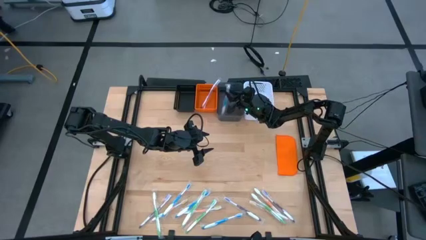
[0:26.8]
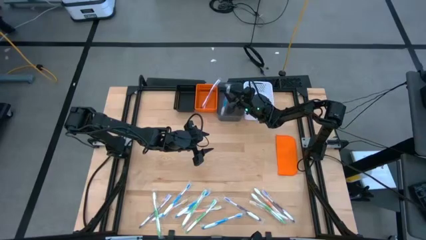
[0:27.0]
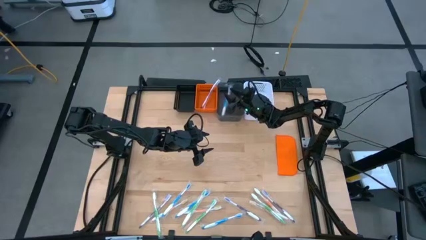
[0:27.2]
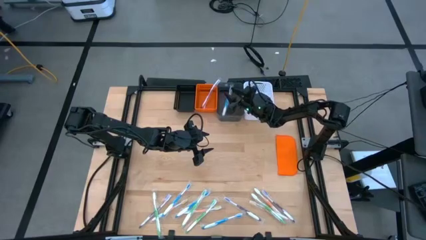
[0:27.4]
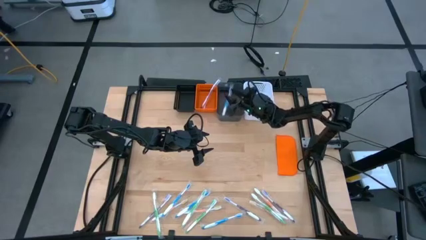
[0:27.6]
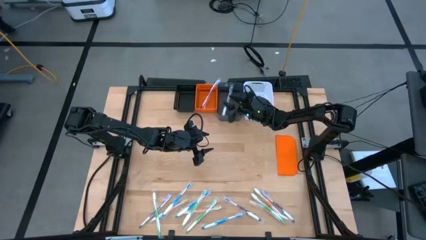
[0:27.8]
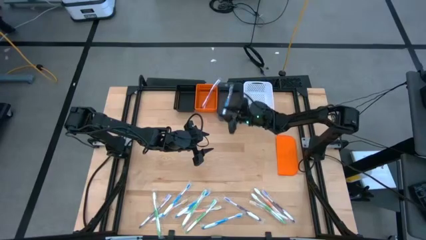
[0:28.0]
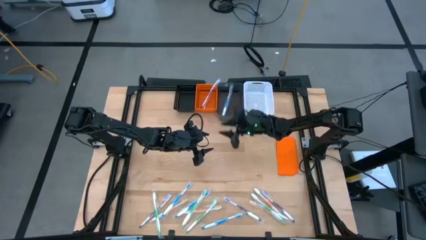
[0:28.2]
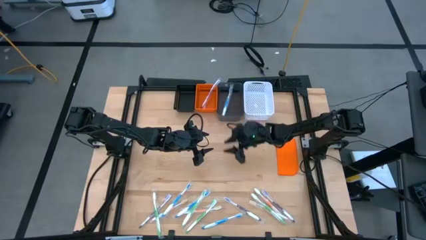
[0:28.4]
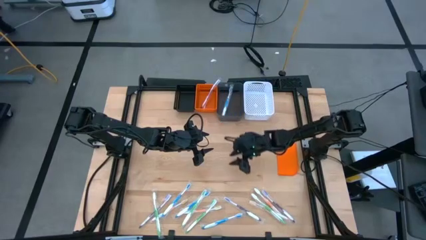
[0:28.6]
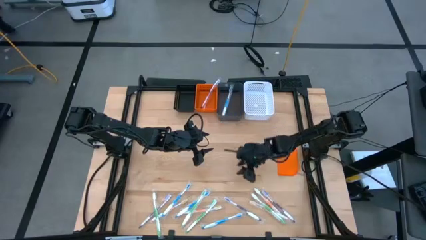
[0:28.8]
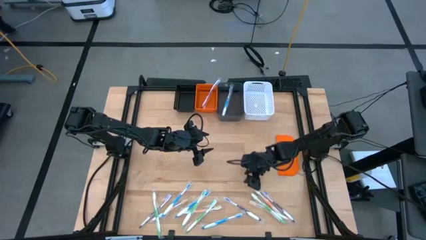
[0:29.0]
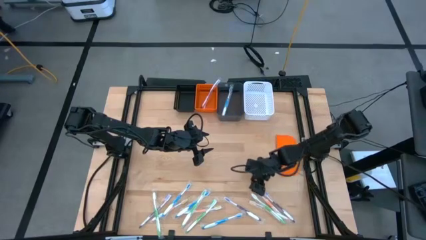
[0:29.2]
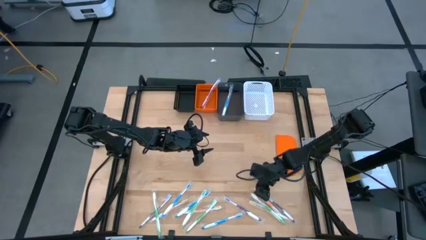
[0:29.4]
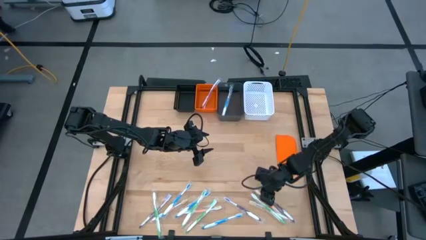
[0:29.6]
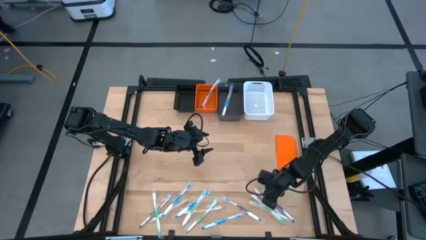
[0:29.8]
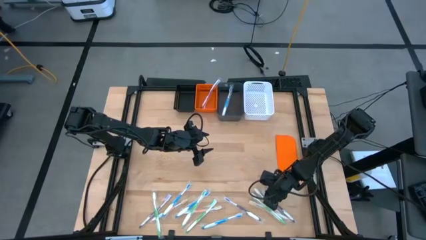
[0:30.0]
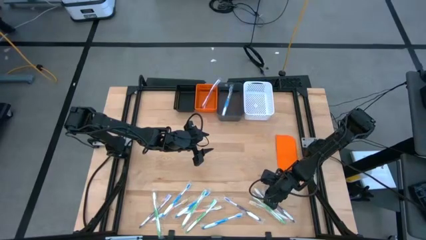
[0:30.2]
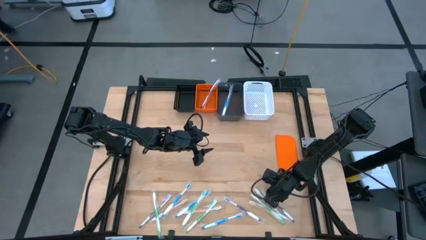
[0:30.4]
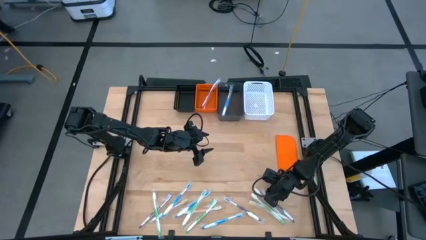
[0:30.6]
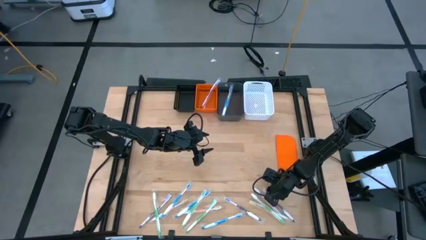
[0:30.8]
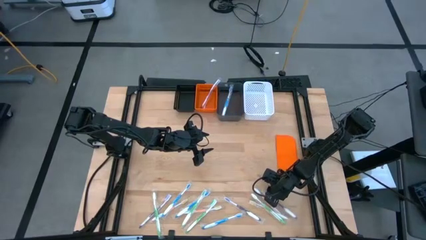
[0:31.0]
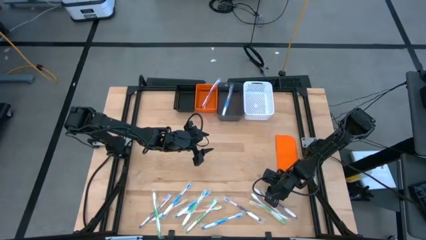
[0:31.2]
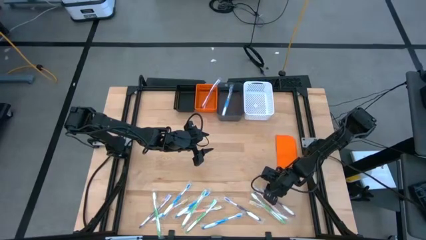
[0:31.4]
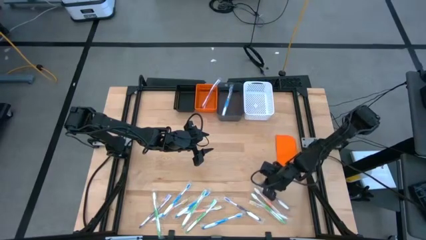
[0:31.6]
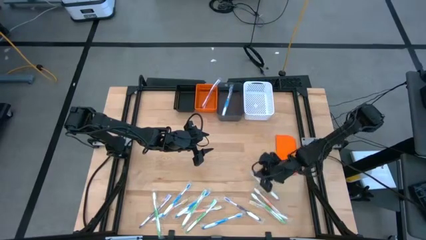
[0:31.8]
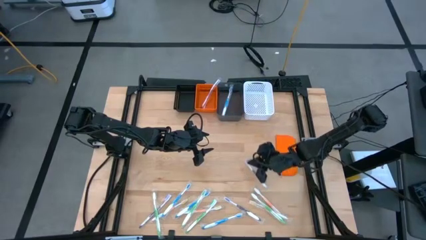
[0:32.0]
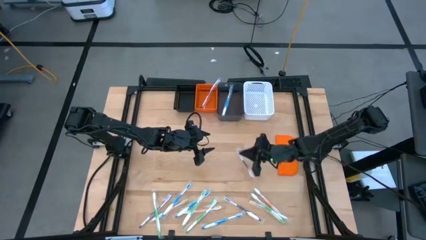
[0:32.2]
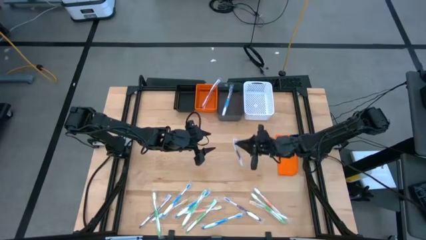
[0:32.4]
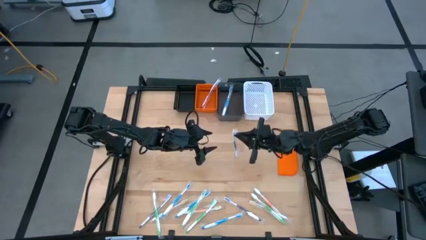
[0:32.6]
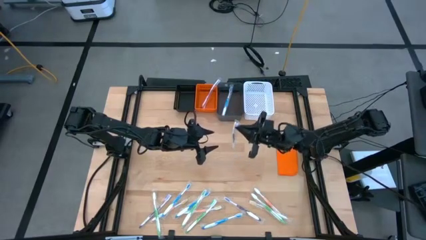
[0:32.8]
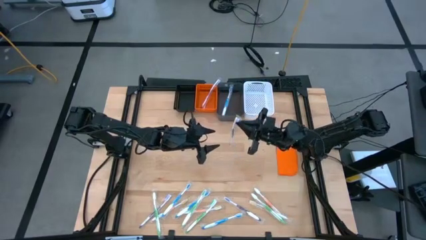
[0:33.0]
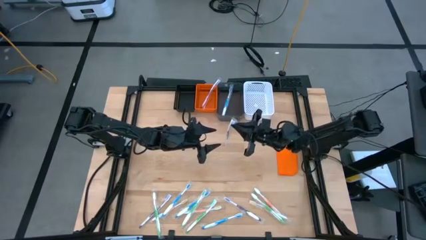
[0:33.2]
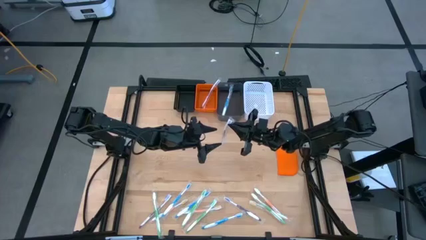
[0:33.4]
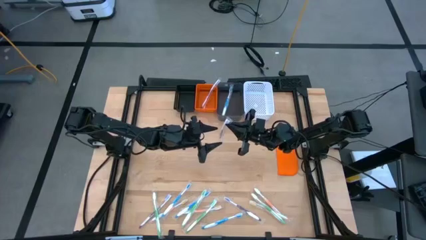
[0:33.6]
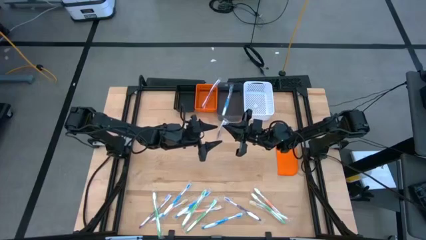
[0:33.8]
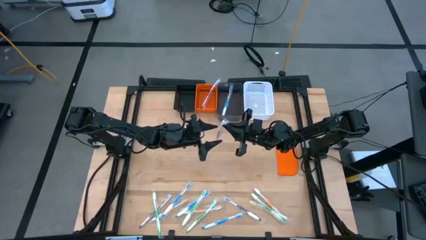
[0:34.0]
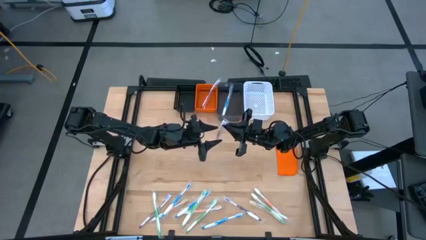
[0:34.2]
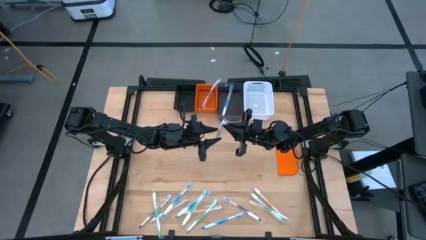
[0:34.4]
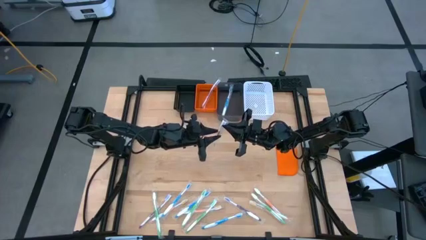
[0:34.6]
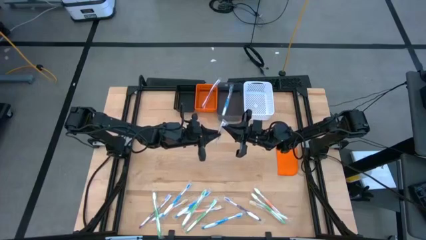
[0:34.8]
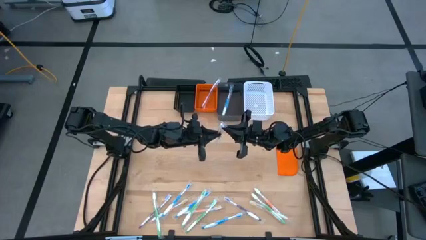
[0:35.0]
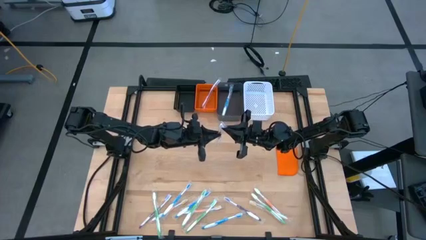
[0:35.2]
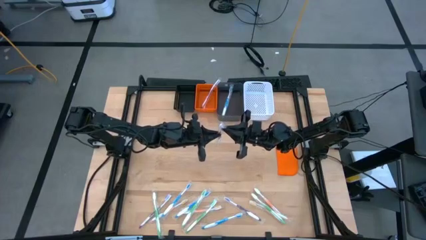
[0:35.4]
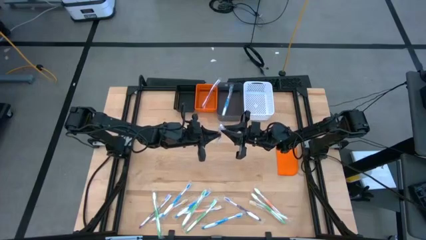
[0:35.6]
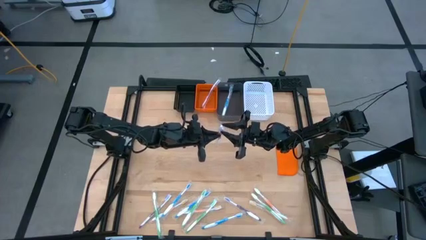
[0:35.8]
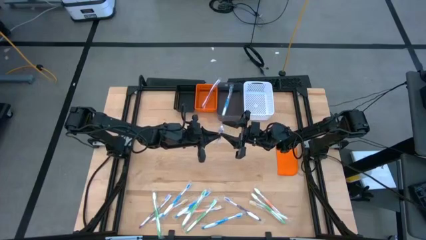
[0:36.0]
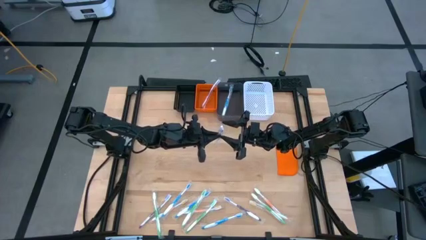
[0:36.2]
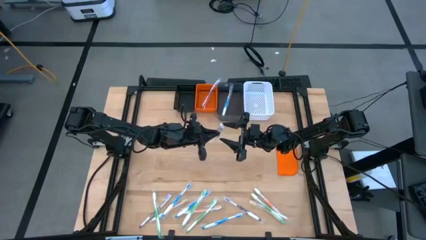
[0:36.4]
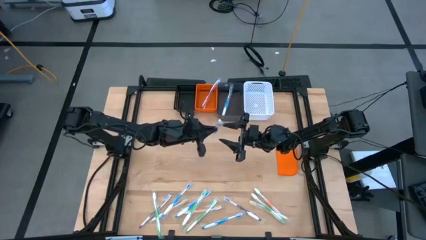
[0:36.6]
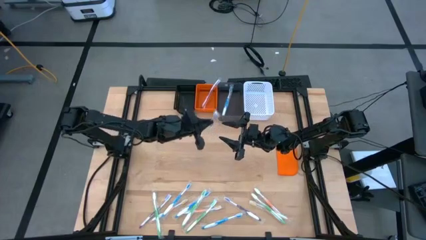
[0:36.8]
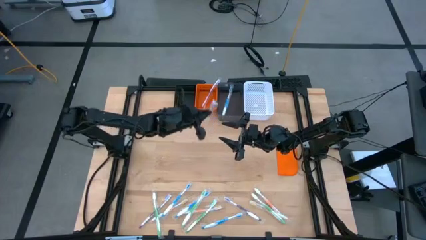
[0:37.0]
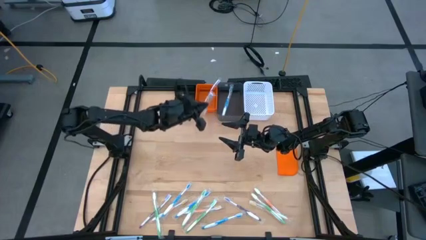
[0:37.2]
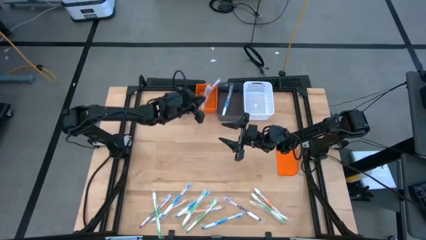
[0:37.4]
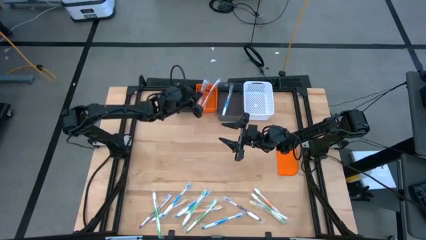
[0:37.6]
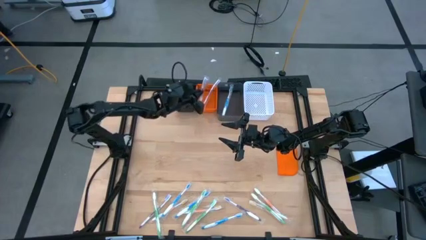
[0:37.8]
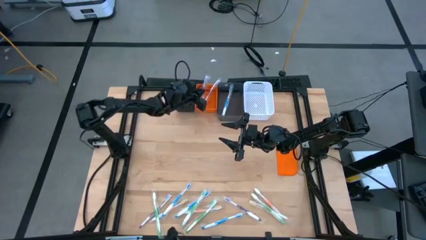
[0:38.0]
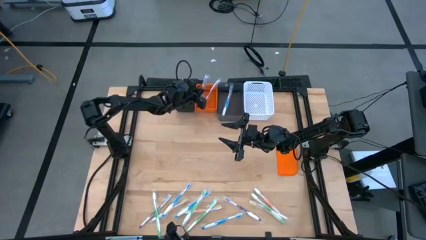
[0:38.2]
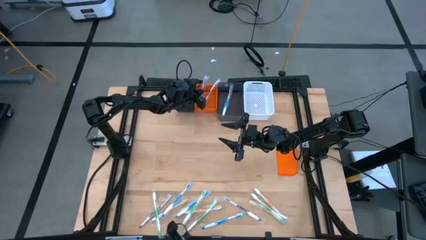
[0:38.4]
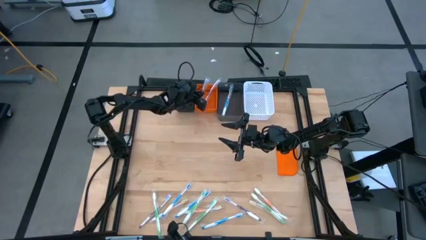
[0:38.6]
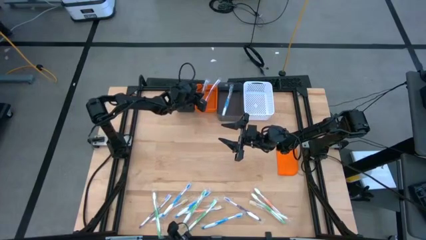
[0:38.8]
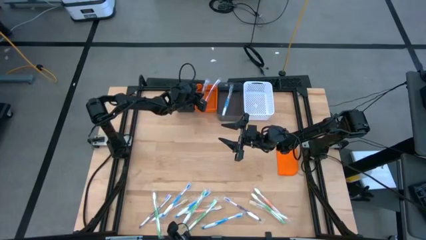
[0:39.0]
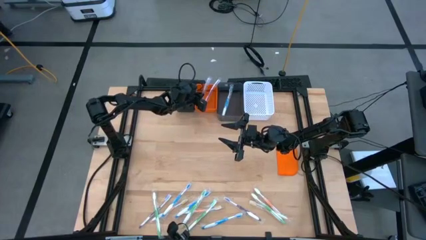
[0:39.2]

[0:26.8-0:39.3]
Task: Pick & Place Toothbrushes
Put the purple toothbrush into the orange bin

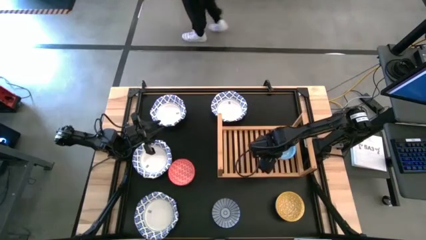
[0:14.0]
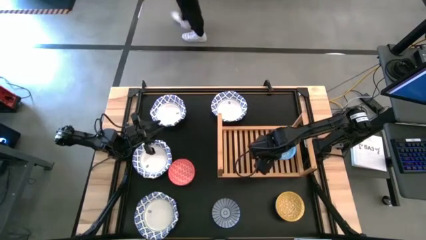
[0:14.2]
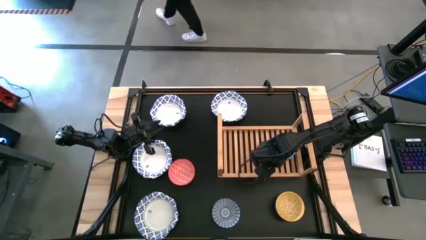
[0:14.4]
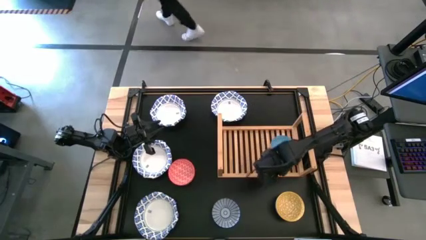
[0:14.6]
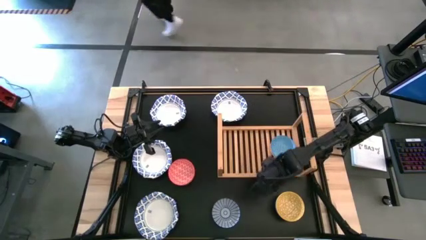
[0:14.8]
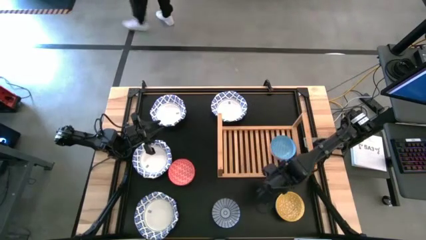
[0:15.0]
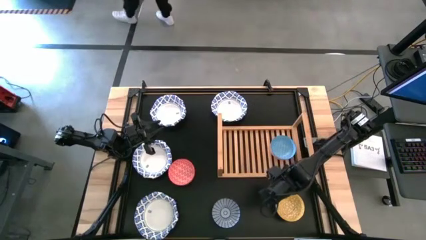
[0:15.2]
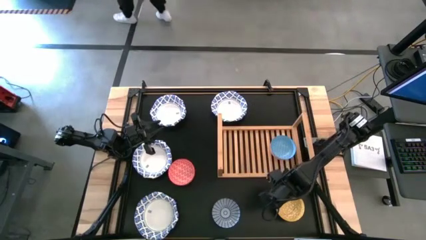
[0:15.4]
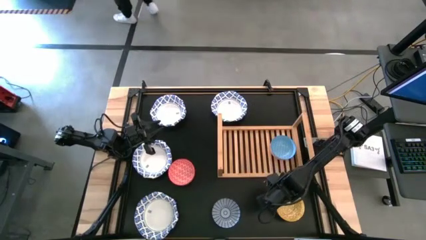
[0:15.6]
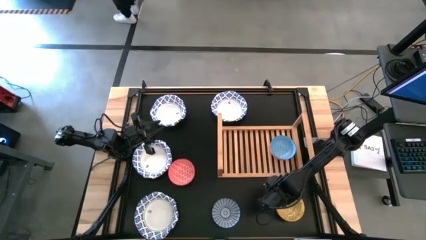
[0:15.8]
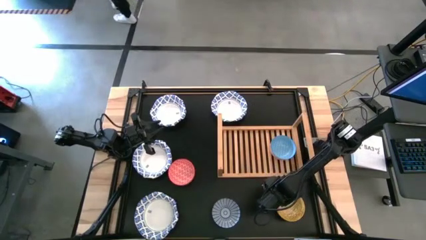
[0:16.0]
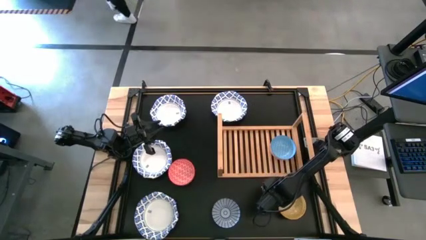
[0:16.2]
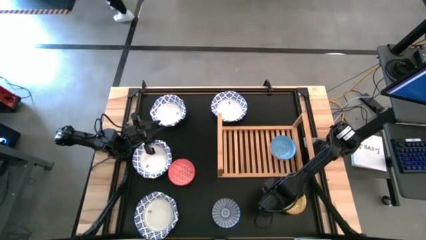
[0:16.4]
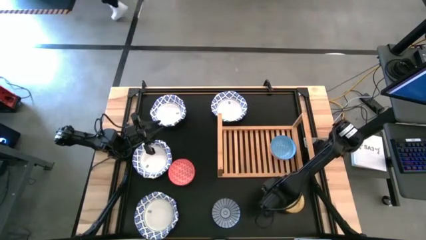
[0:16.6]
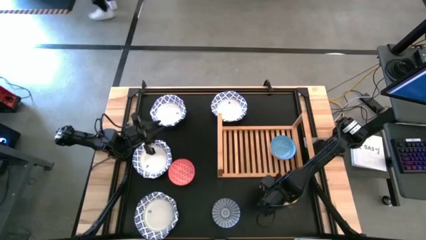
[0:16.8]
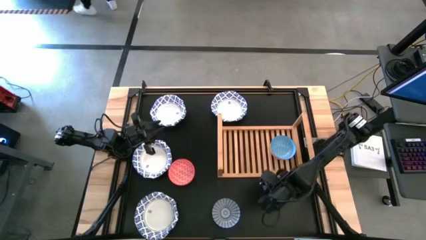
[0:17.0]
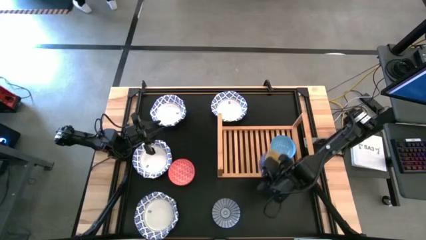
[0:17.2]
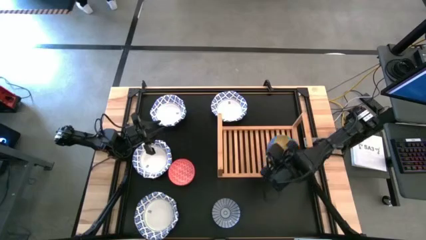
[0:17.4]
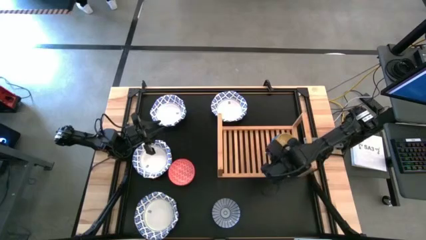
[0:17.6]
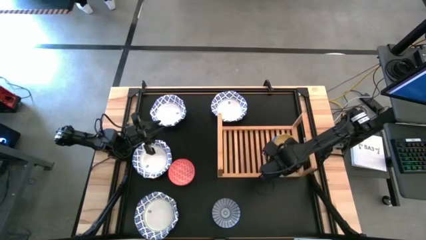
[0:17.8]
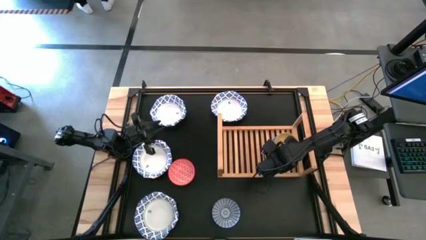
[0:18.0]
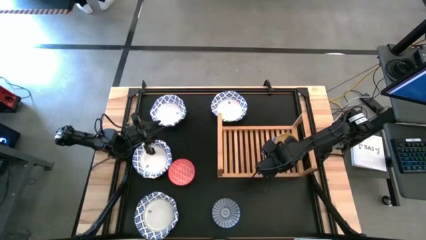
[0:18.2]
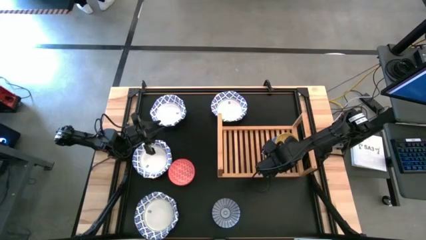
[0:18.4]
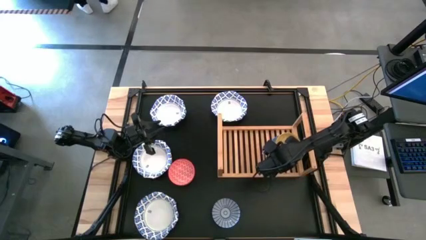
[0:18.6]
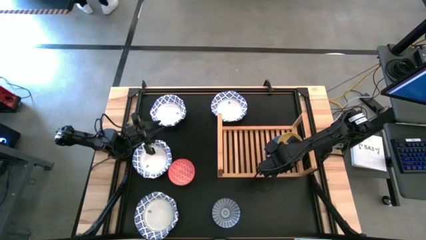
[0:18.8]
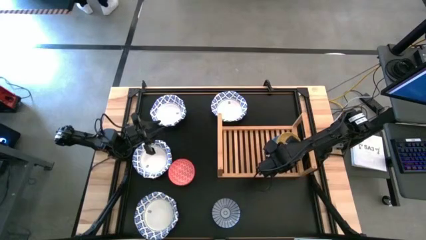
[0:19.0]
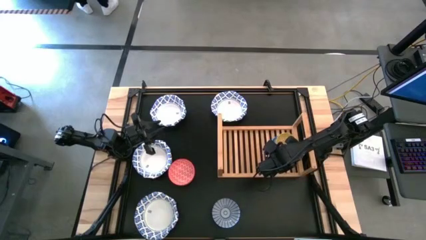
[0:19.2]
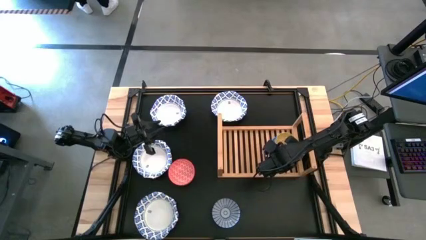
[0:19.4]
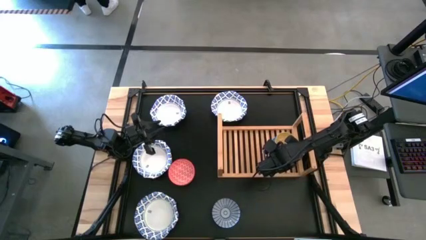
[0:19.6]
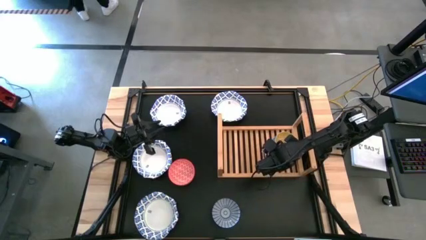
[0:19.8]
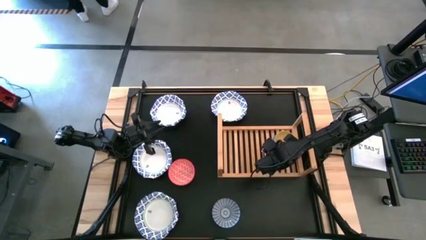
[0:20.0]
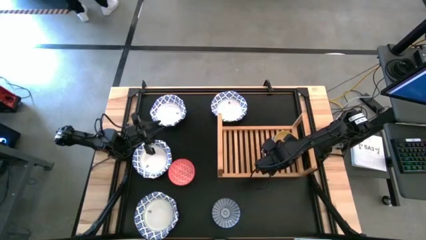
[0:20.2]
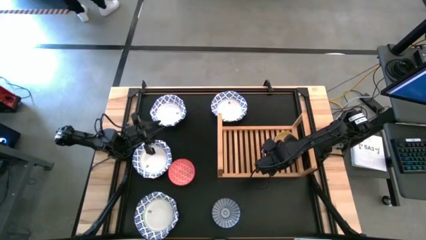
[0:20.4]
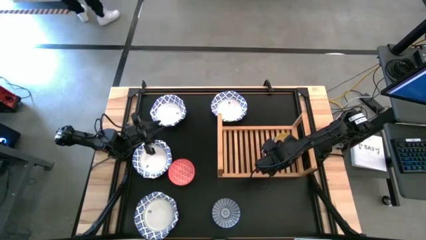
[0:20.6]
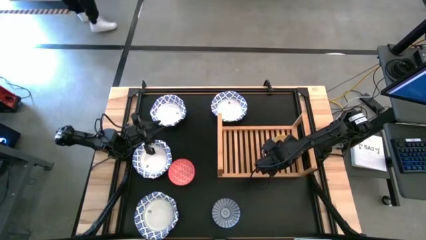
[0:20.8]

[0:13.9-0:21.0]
Task: Place and stack bowls onto a shelf
Stack the yellow patterned bowl on top of the light blue patterned bowl on the shelf
